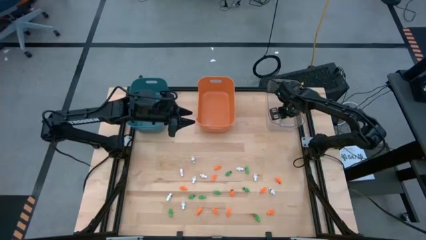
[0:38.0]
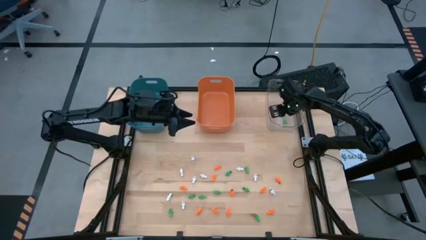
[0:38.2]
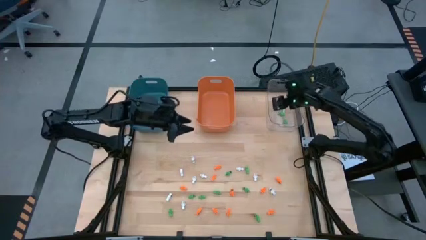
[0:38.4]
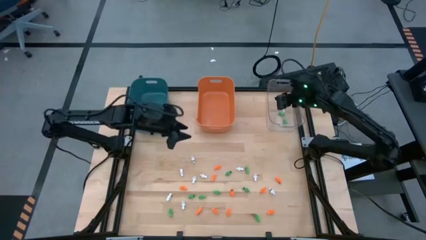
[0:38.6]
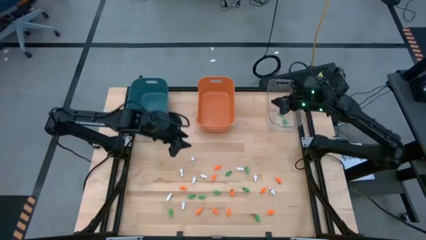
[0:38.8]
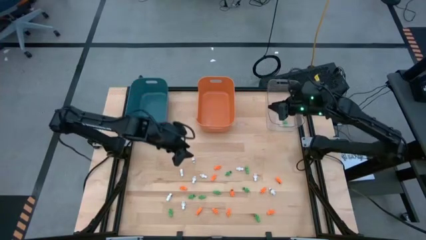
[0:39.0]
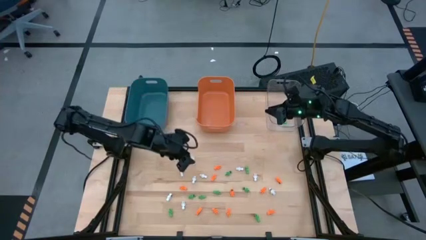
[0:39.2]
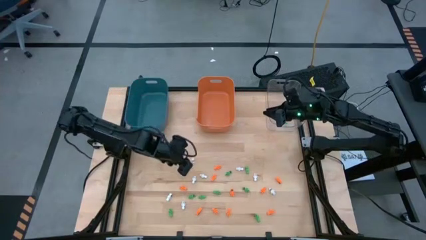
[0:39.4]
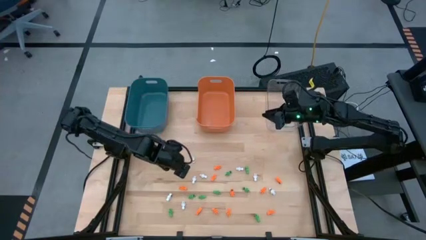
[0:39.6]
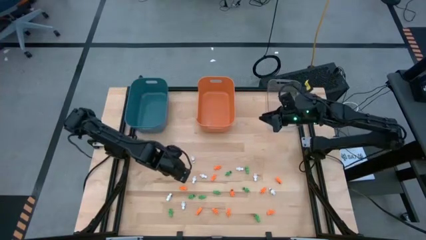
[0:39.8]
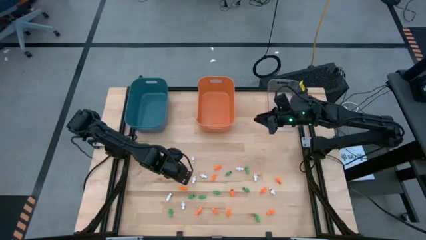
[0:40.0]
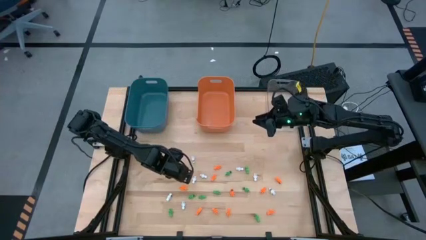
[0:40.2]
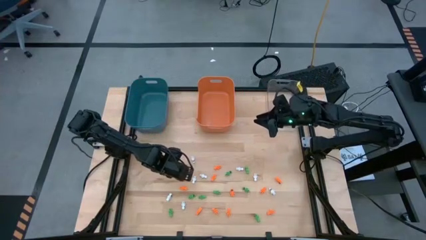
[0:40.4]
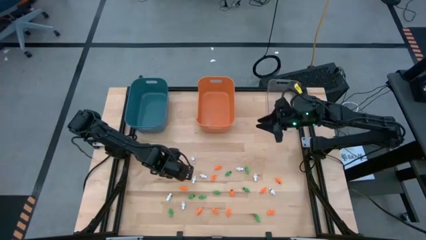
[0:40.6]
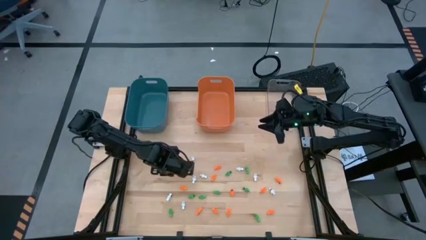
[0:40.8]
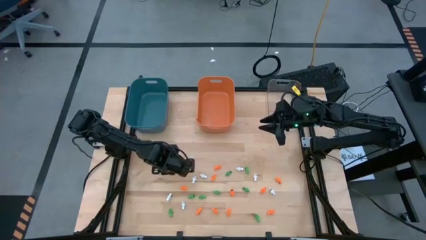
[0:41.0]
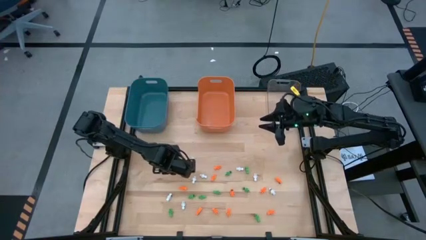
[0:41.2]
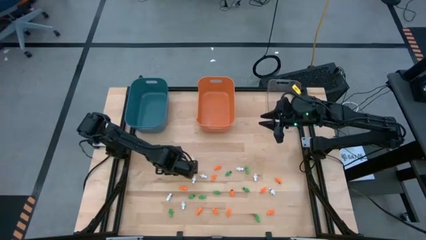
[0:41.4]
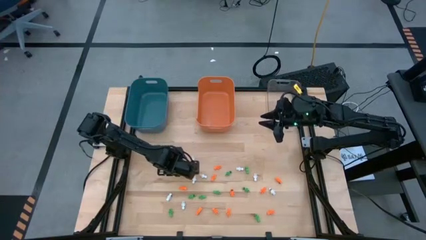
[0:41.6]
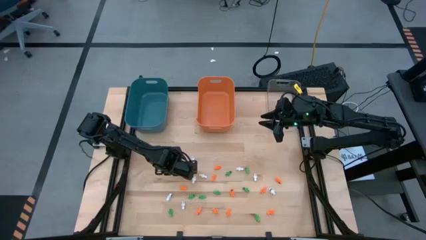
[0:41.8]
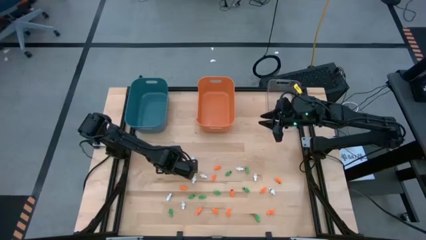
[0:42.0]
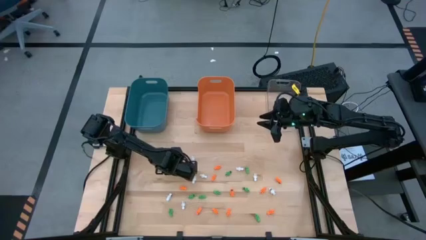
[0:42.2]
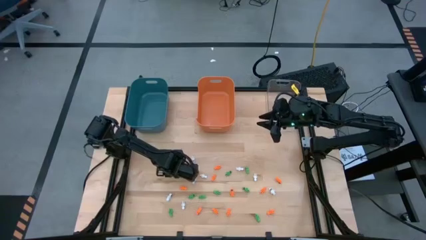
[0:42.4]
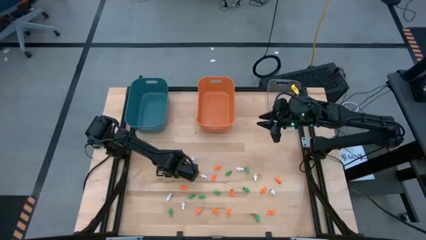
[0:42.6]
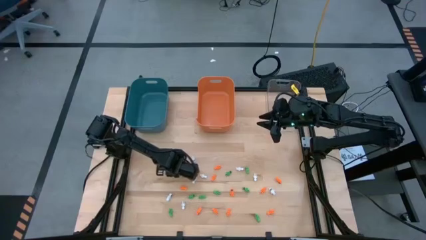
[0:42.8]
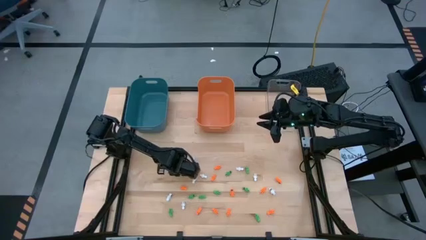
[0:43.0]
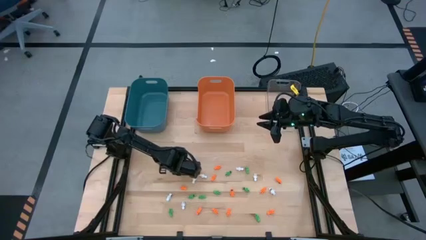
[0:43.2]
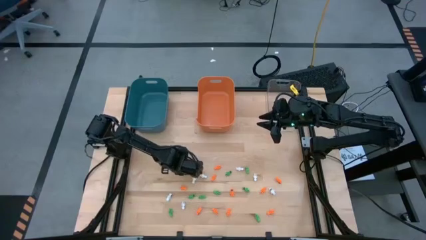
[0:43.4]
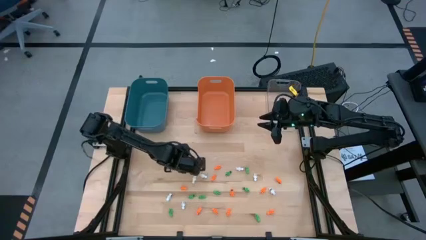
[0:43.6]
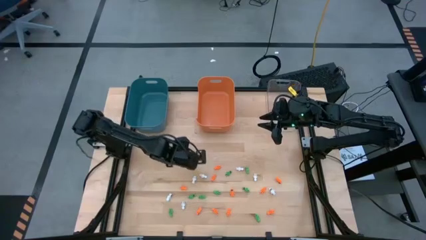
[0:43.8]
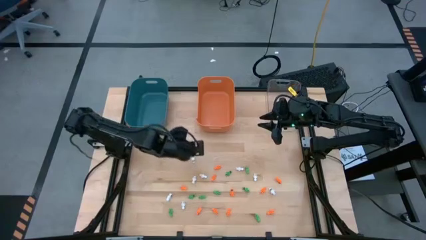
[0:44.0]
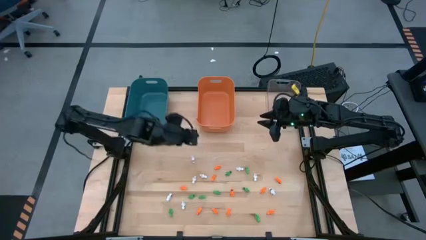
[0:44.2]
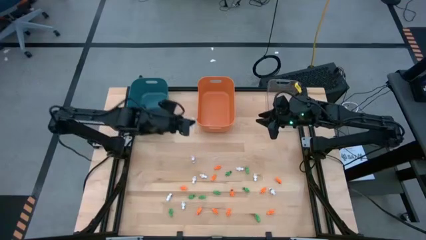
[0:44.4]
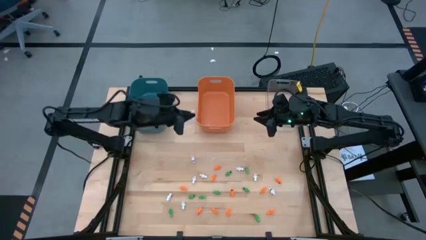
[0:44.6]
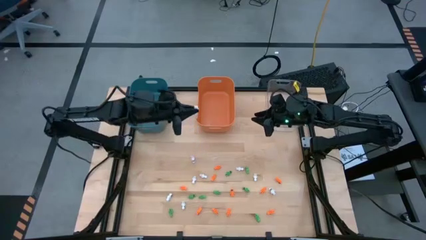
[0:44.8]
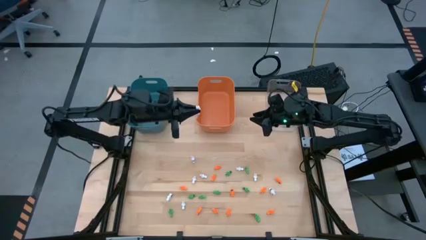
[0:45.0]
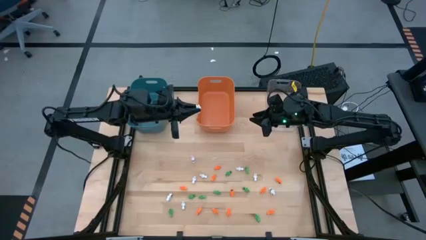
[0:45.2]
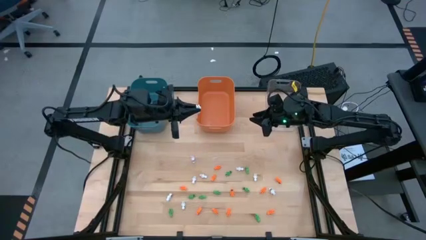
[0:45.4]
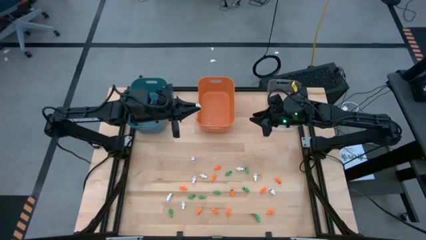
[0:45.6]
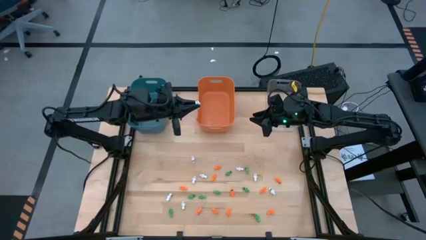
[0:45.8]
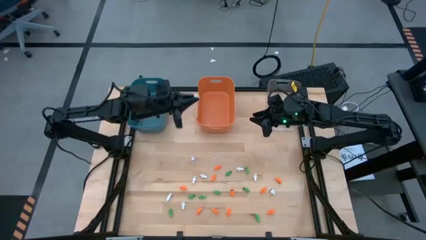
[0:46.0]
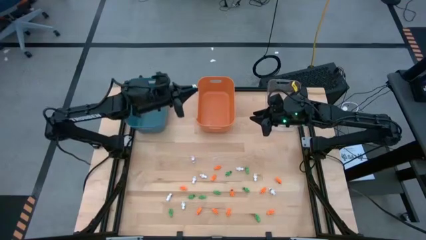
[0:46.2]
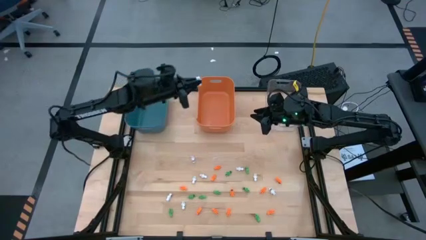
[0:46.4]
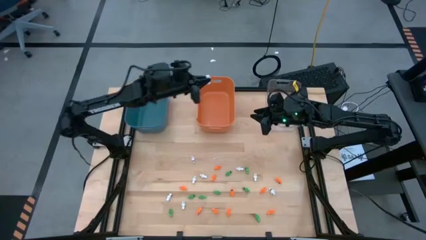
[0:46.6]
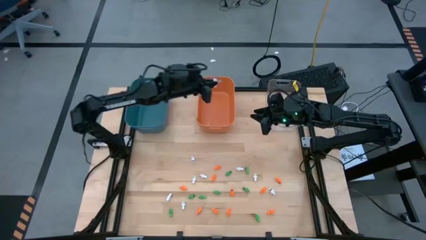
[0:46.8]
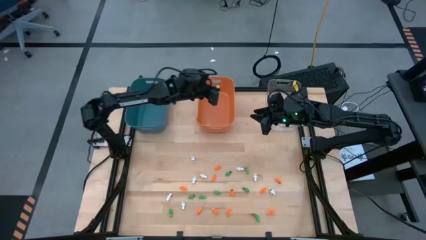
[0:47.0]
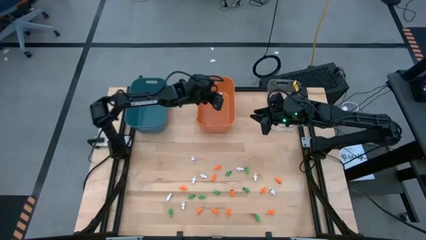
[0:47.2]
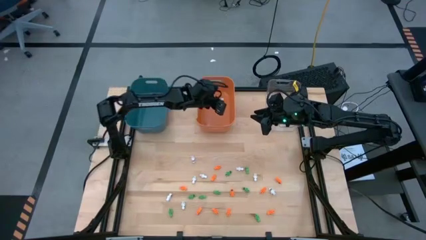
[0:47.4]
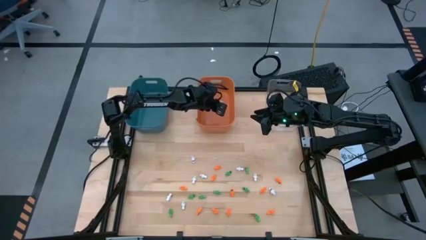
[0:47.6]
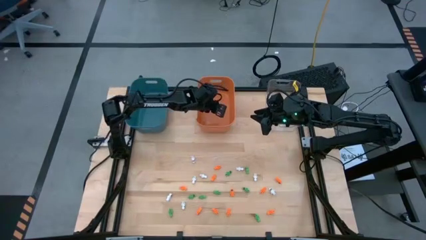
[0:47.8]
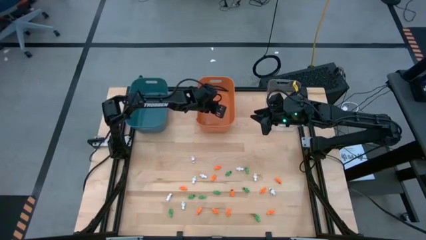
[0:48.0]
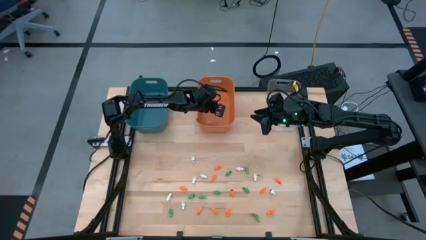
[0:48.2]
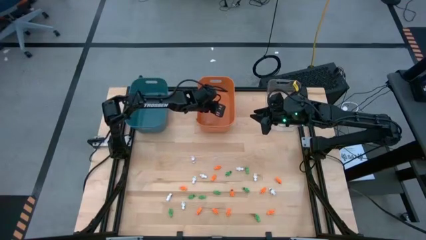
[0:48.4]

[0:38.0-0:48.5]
Task: Sort Halloween decoration
Put the white skeleton toy into the orange bin
